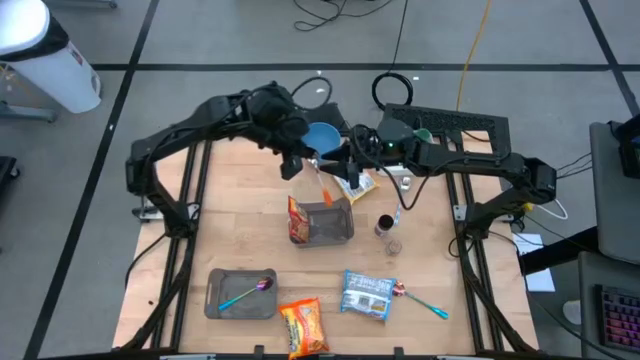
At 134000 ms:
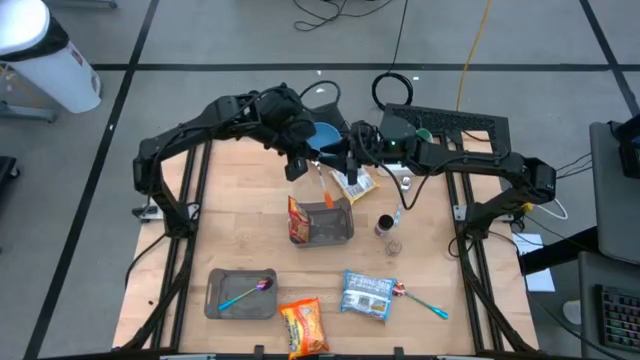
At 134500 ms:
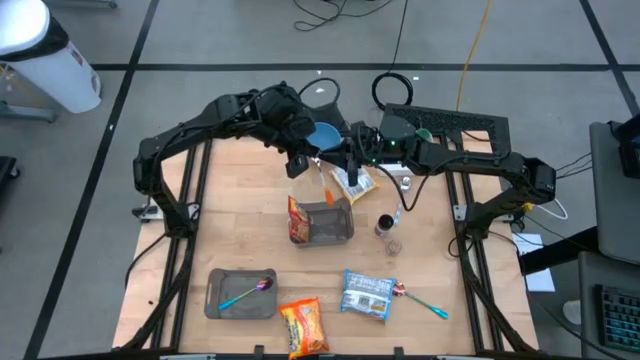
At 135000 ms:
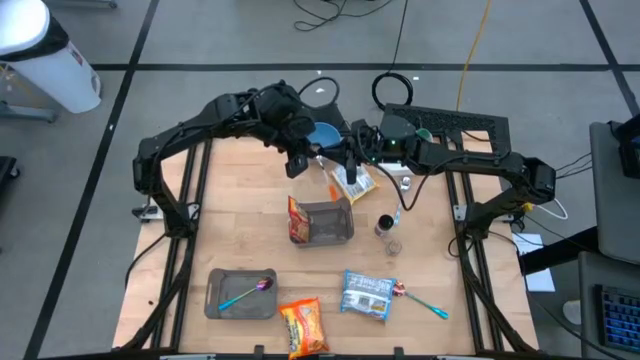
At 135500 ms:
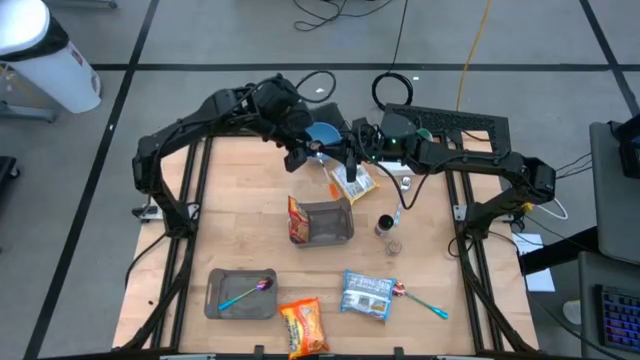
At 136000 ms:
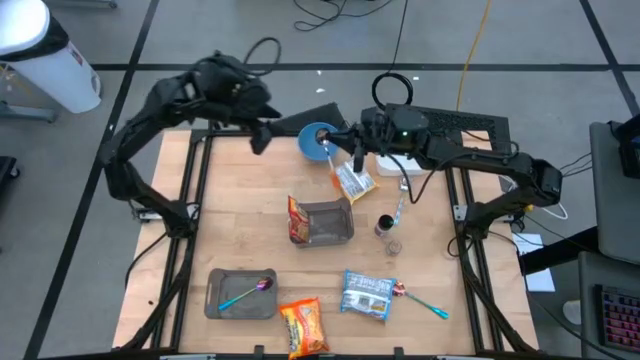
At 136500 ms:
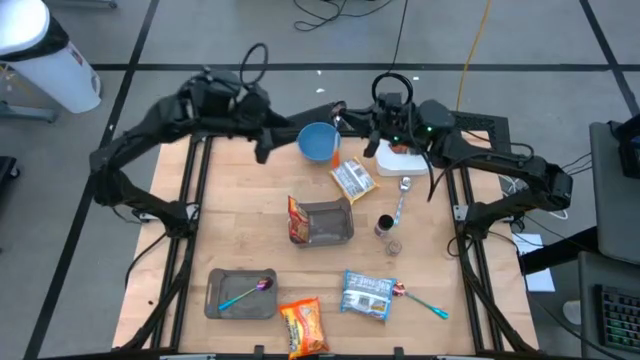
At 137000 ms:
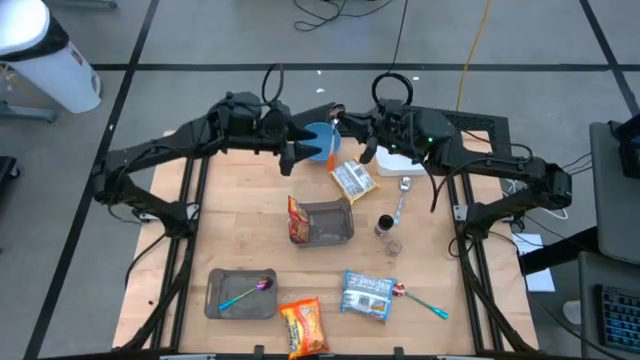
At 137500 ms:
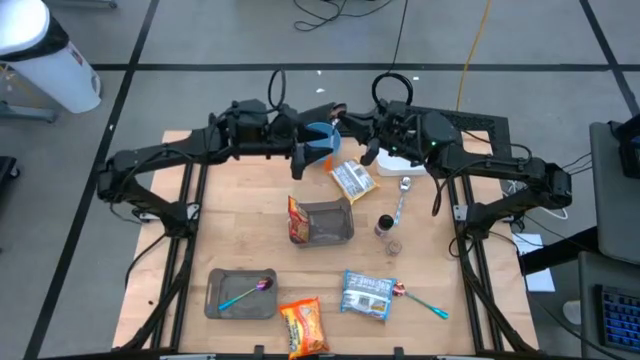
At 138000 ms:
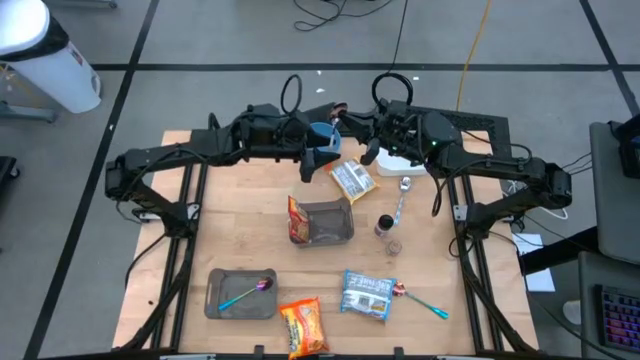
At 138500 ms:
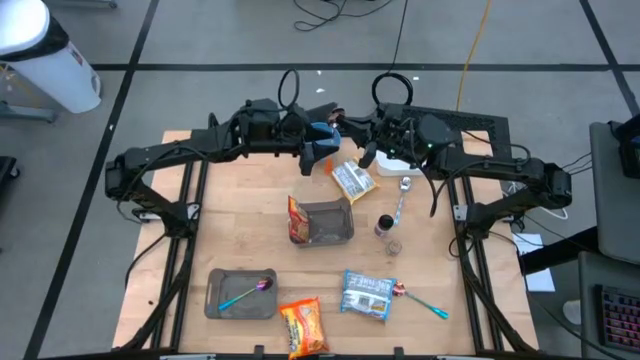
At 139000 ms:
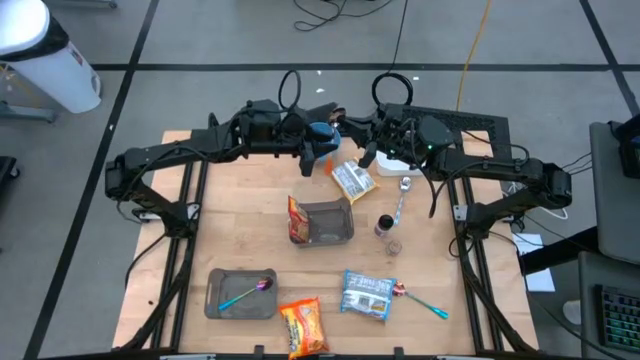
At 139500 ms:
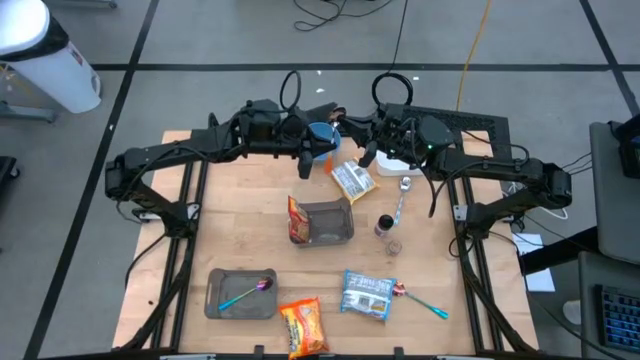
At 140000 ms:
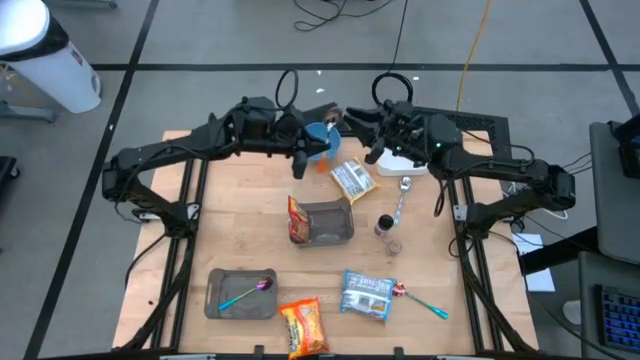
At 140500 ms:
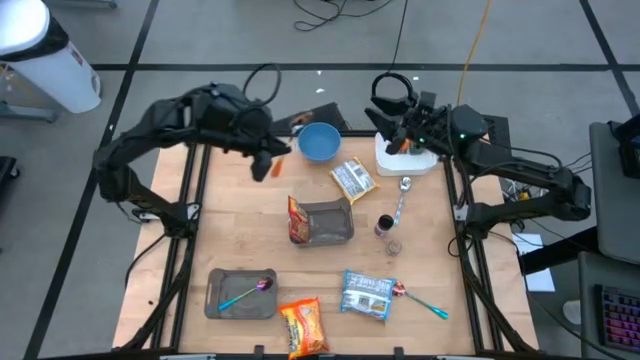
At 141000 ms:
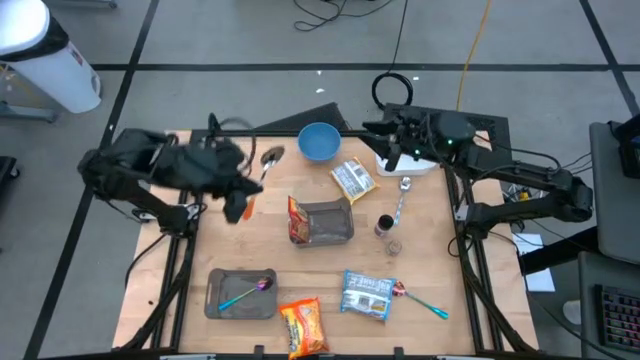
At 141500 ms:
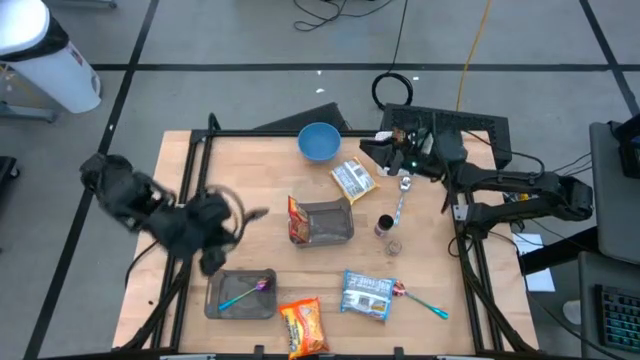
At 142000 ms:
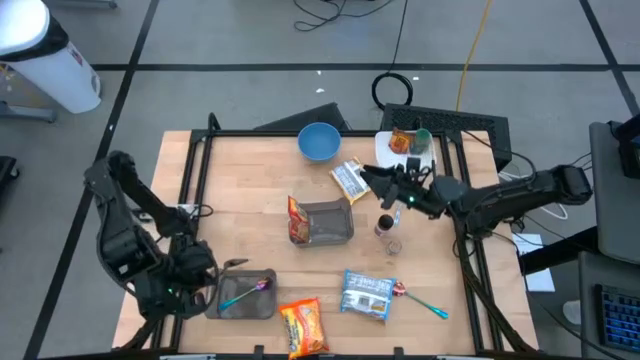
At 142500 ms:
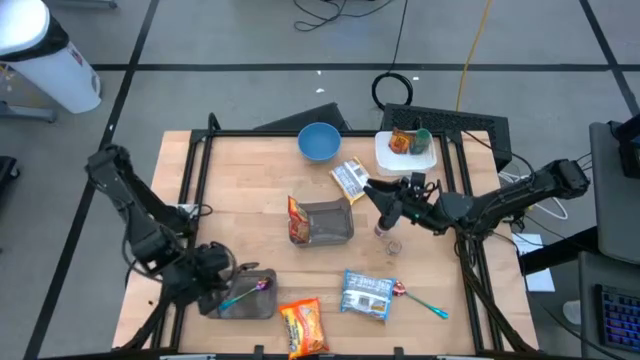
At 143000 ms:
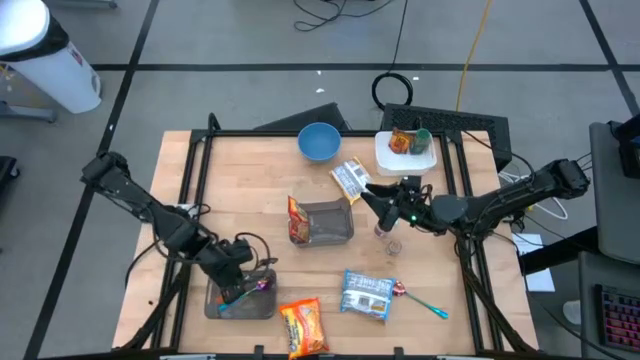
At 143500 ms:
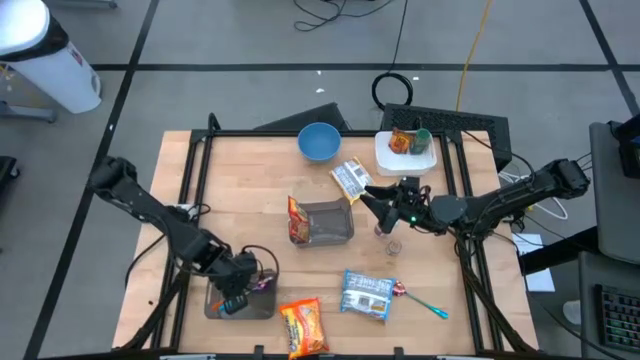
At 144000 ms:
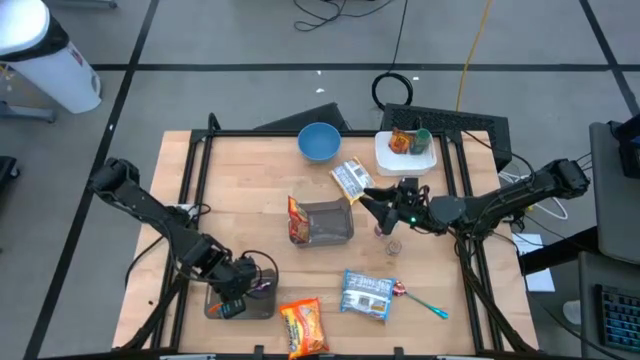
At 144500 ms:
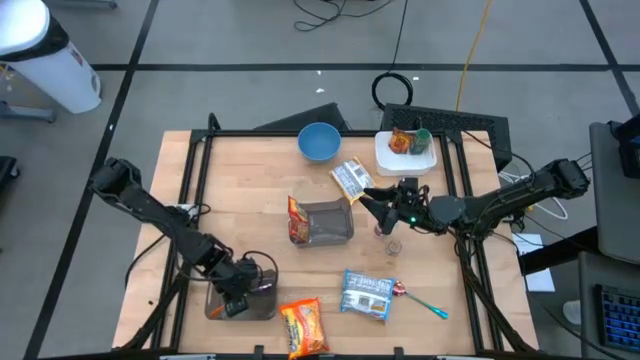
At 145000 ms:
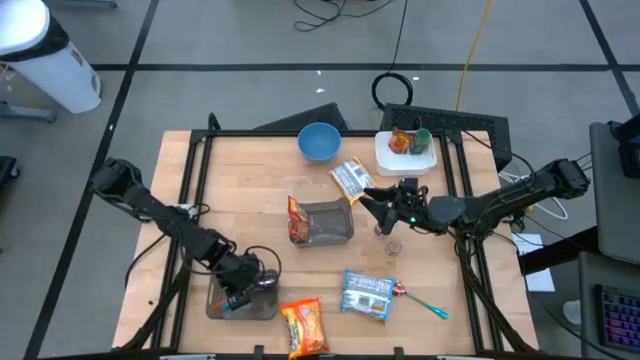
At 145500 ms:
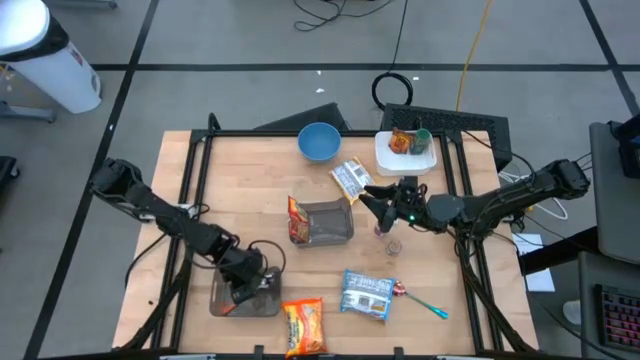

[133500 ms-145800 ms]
Task: Pick & Place Food Item
Put the orange spoon into the bottom black bin

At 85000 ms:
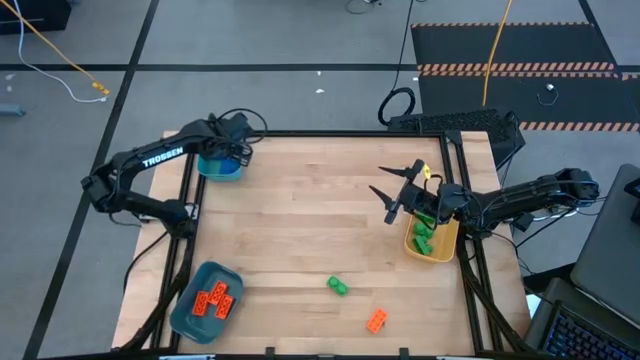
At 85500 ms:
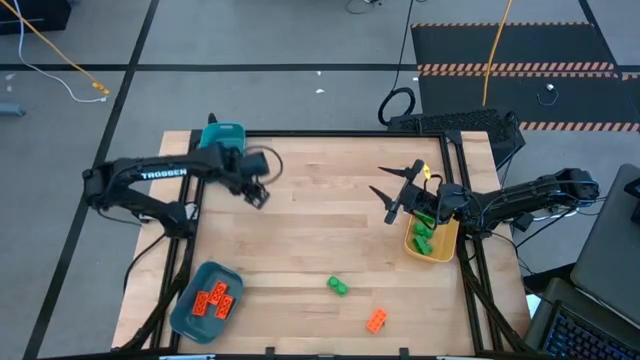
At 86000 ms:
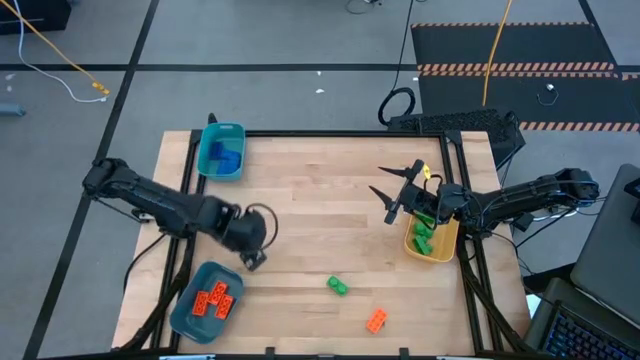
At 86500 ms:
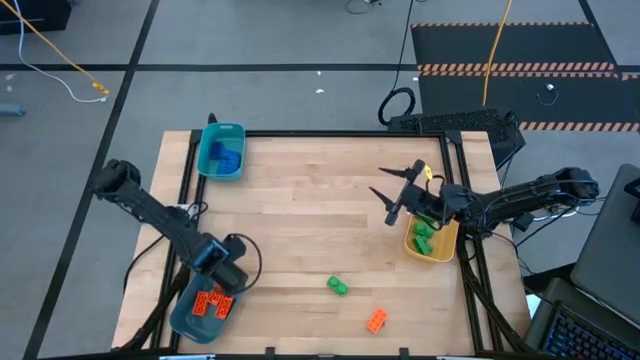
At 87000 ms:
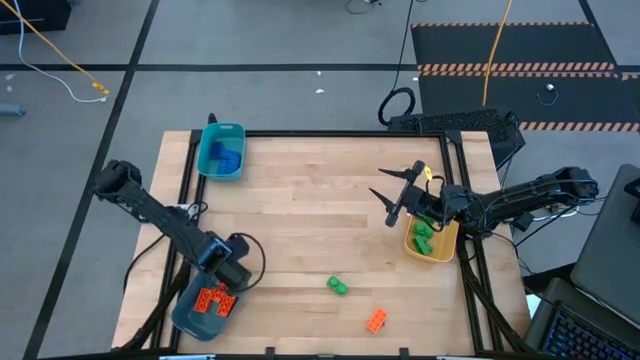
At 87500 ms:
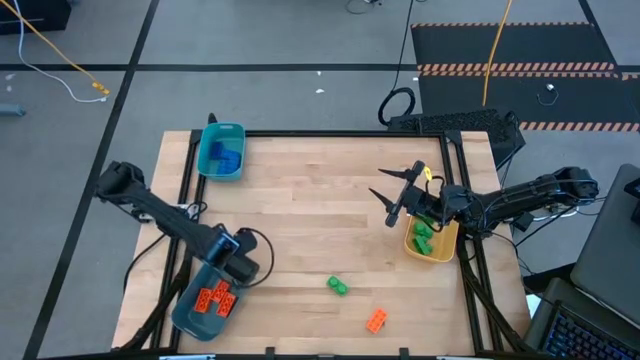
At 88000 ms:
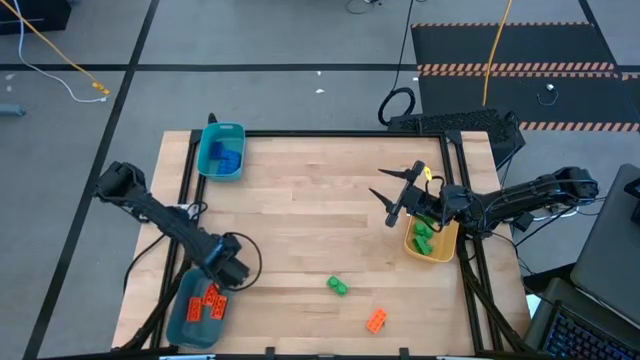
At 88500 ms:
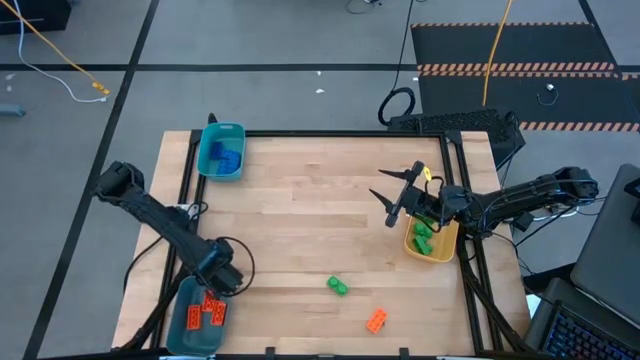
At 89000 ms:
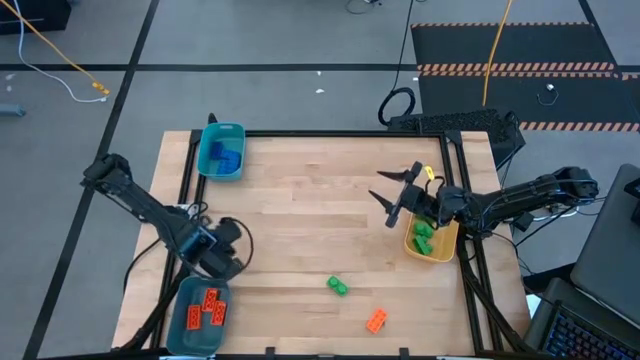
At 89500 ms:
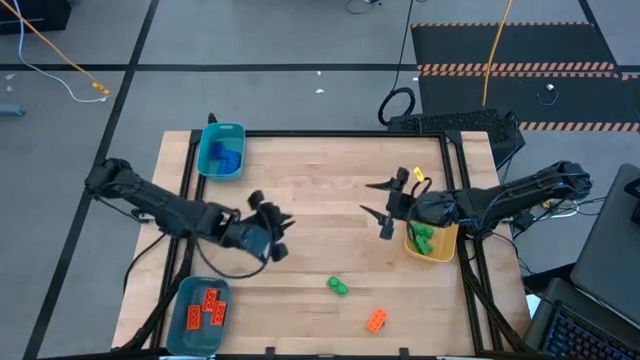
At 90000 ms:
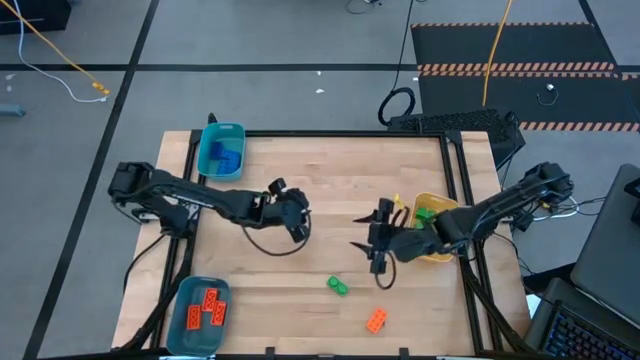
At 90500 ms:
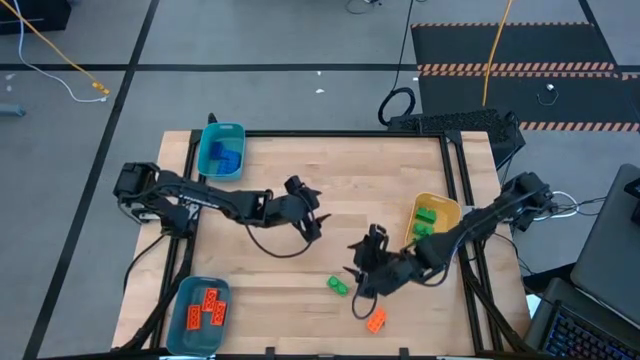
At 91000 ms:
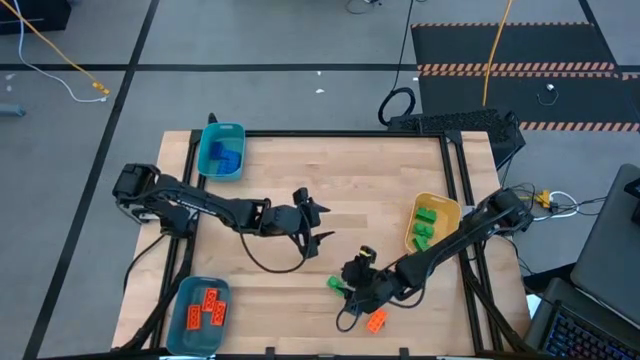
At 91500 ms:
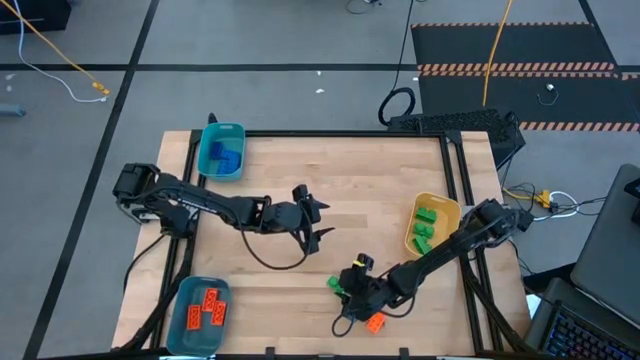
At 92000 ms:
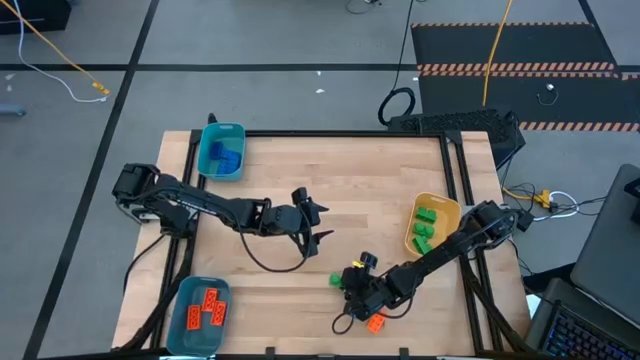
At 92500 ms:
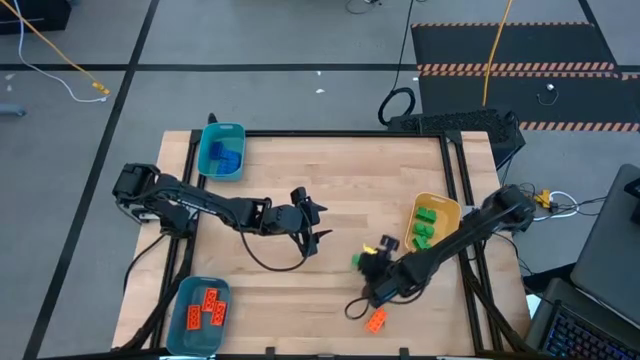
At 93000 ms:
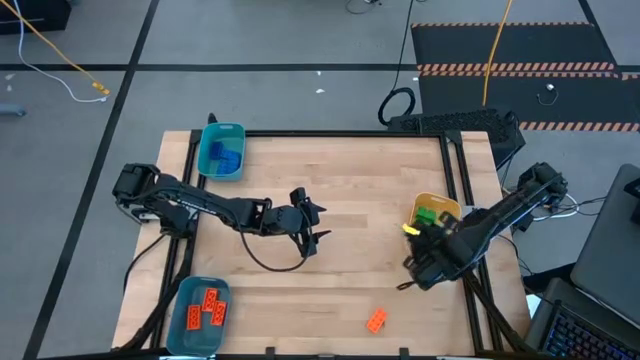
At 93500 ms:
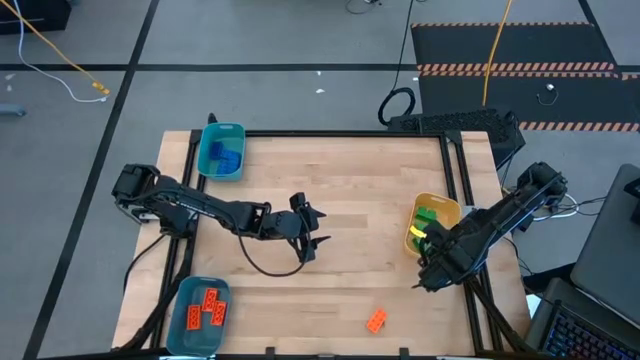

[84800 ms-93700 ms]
Task: Sort & place blocks by color
Put the green game piece into the yellow bin
